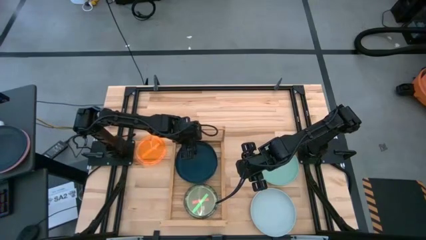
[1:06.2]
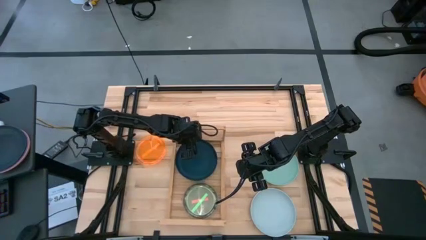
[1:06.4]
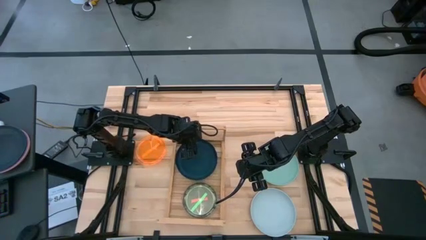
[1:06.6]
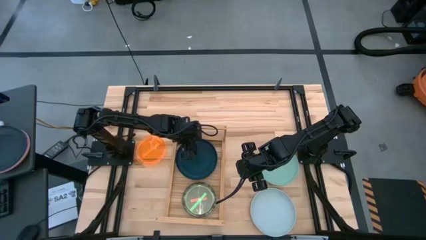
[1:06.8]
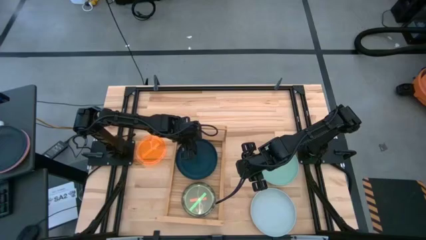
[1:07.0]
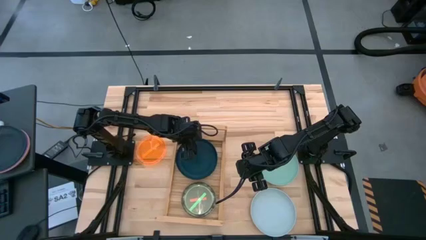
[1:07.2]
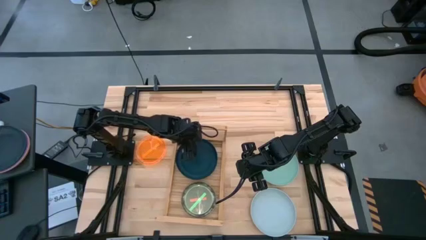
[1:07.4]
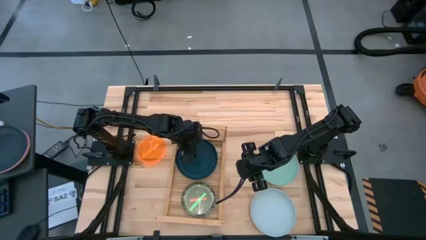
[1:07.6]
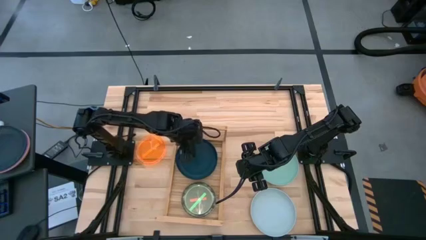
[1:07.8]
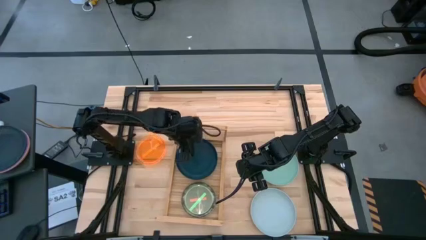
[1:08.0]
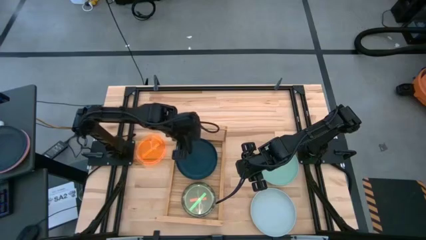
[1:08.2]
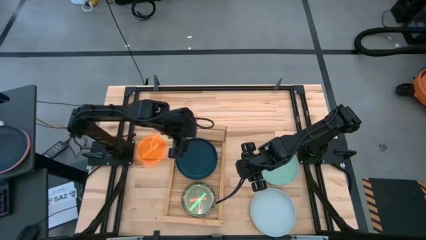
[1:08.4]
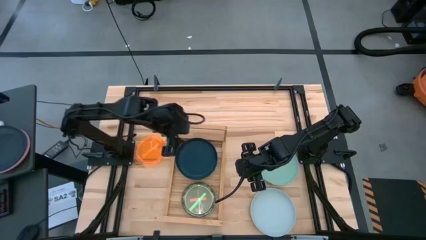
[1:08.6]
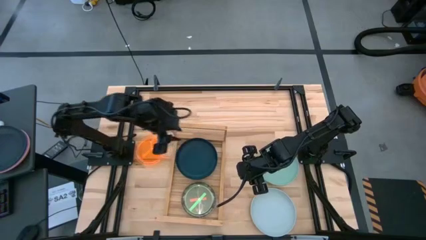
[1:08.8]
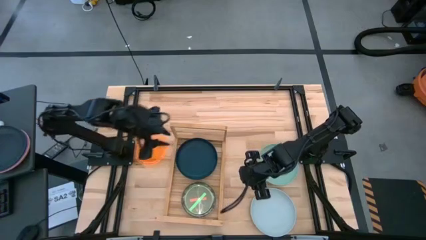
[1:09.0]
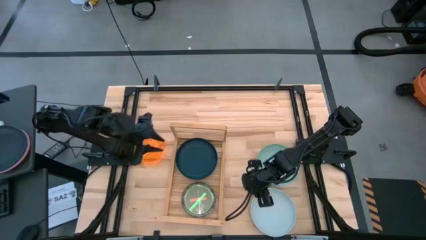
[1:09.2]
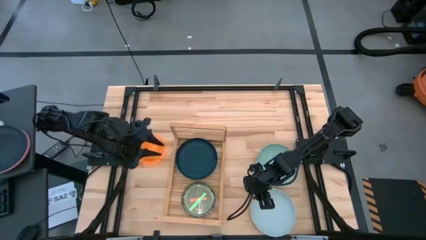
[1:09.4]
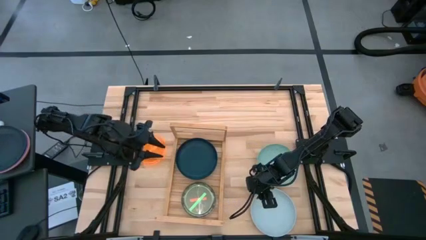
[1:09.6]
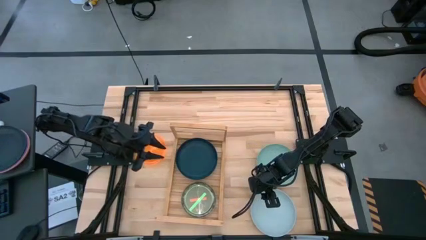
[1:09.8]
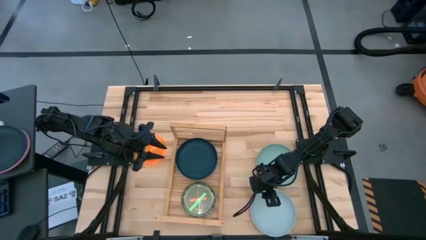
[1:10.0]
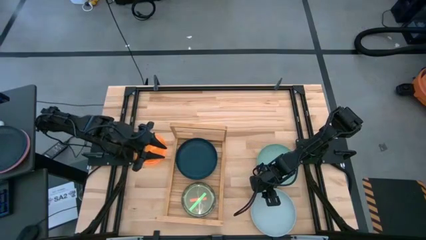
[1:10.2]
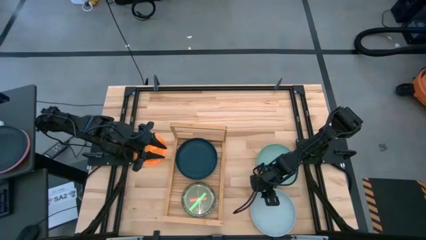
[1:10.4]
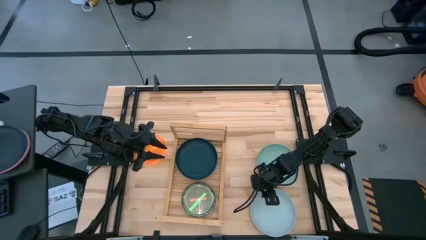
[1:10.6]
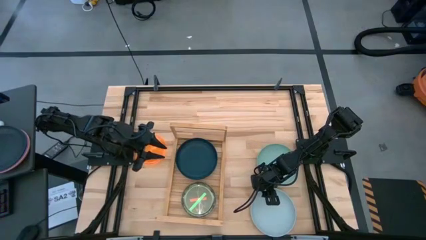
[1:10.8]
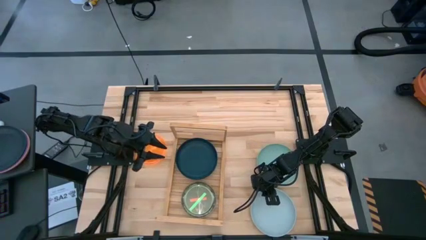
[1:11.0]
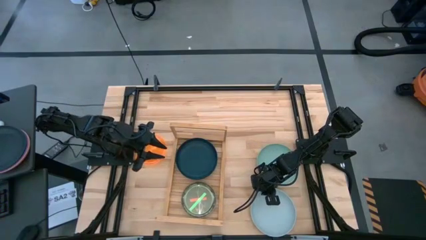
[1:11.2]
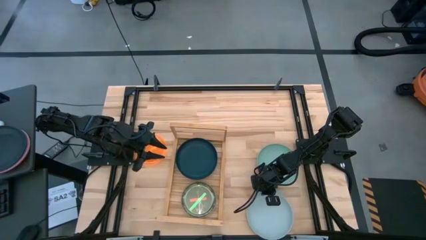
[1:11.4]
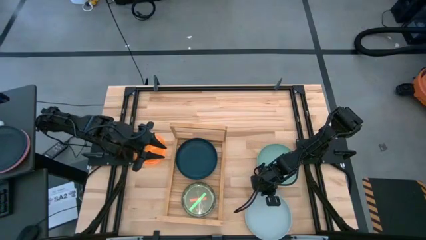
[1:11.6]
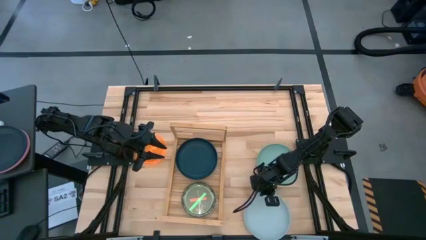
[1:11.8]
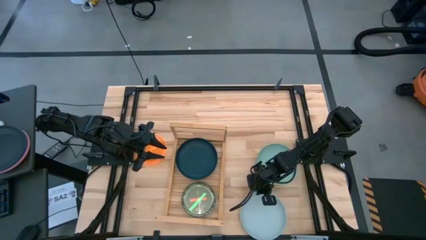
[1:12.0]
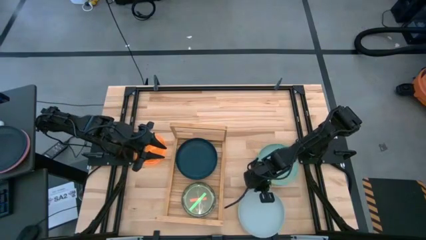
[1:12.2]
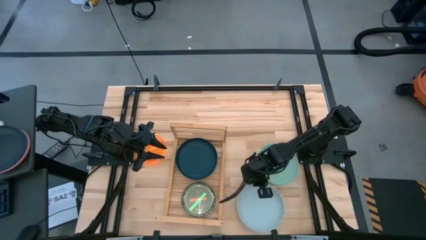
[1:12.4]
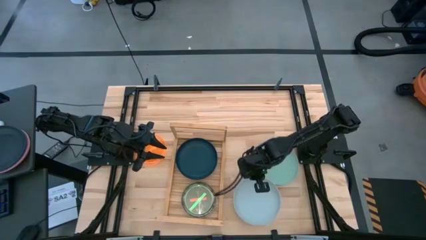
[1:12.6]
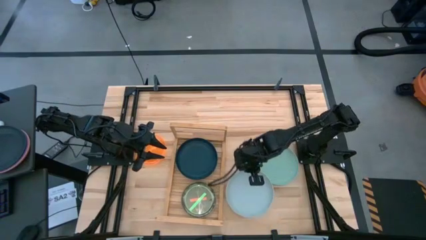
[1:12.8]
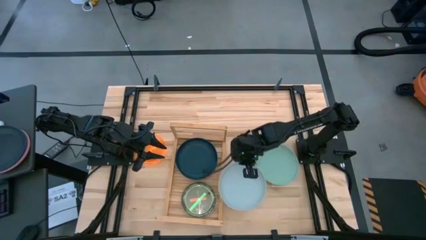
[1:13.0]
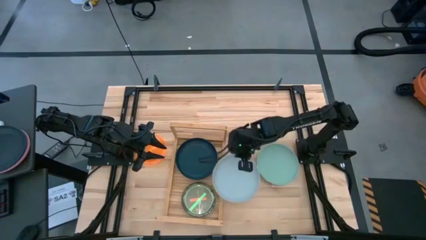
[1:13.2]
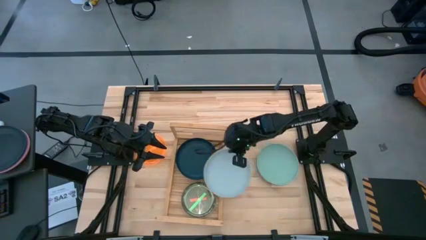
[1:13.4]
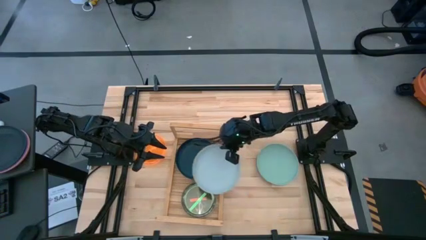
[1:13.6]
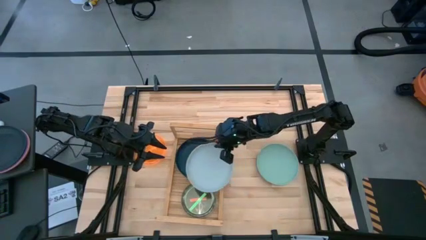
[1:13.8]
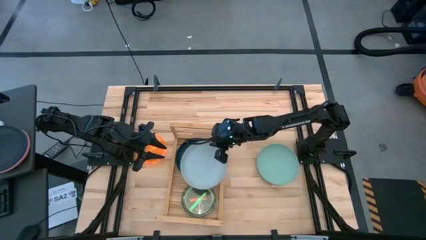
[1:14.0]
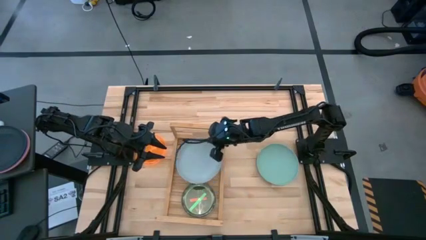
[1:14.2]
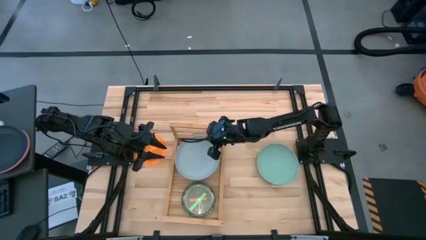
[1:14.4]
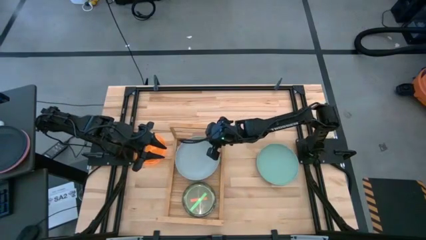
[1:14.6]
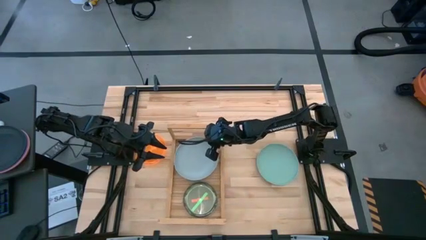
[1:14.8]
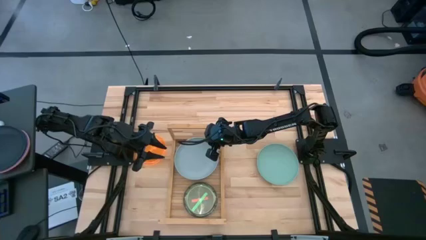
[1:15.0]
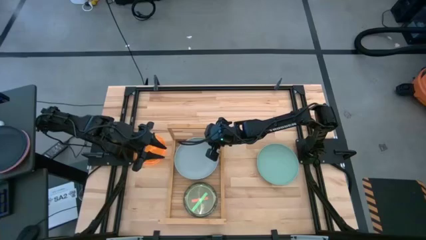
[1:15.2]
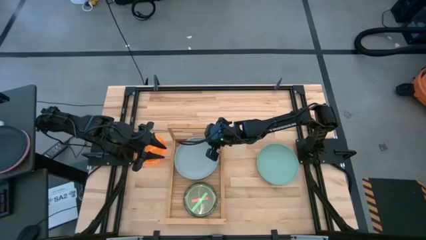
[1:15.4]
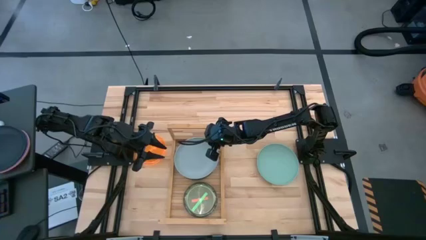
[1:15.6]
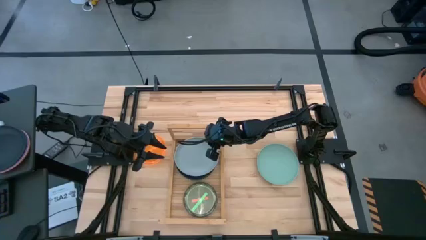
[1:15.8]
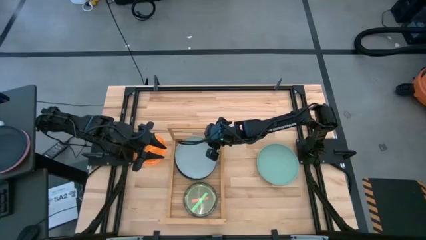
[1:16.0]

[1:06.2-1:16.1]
Task: Place and stack plates onto a shelf
Stack the big gray plate on top of the big black plate on the shelf
